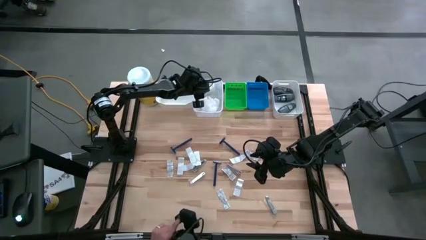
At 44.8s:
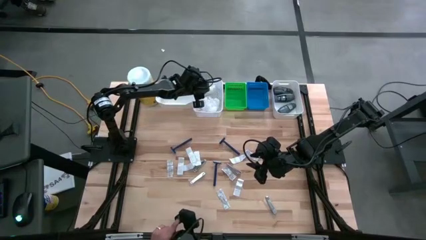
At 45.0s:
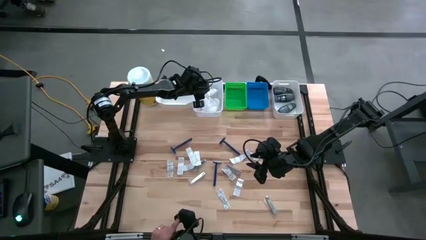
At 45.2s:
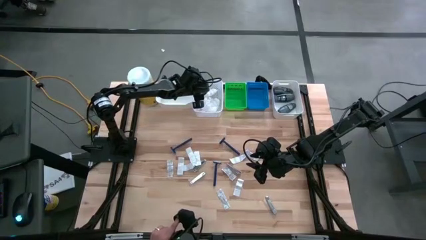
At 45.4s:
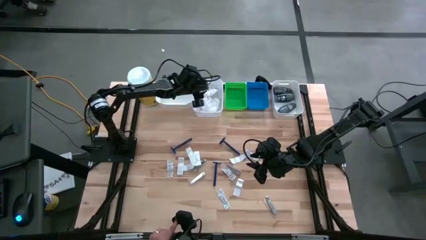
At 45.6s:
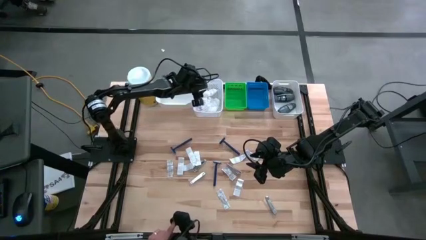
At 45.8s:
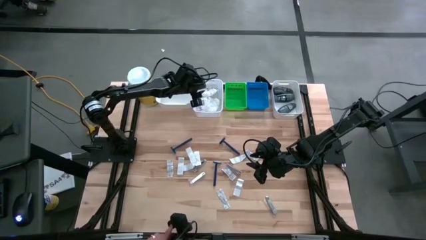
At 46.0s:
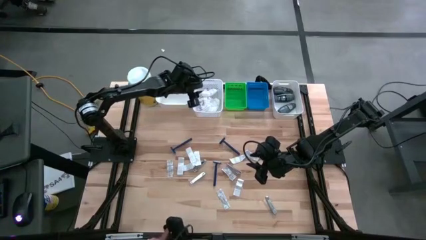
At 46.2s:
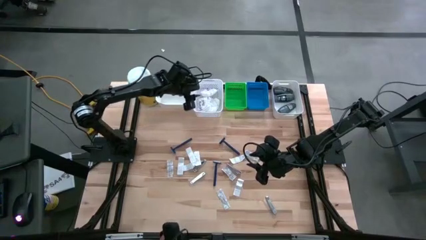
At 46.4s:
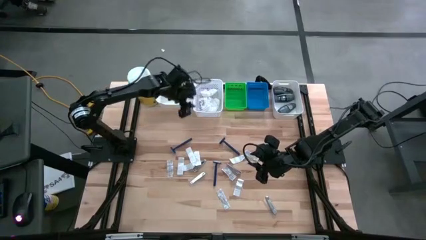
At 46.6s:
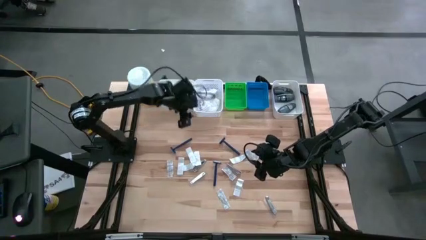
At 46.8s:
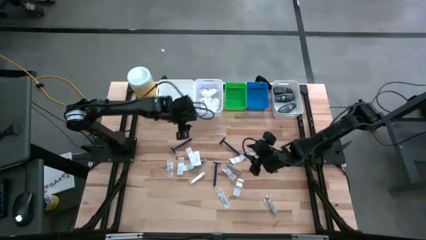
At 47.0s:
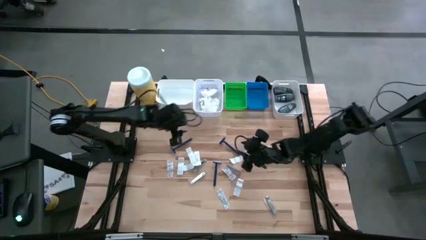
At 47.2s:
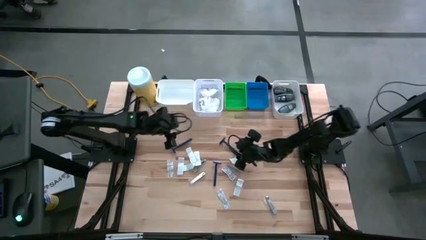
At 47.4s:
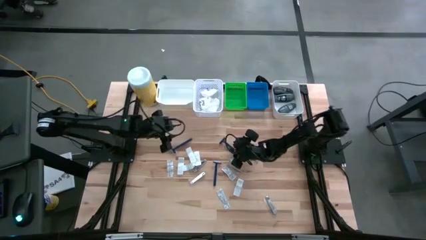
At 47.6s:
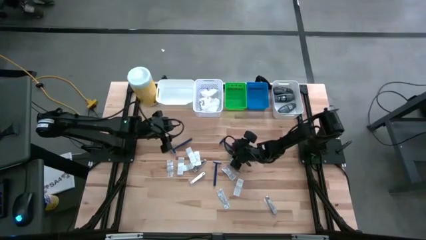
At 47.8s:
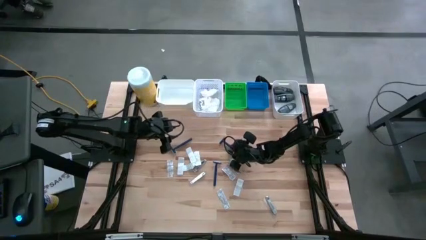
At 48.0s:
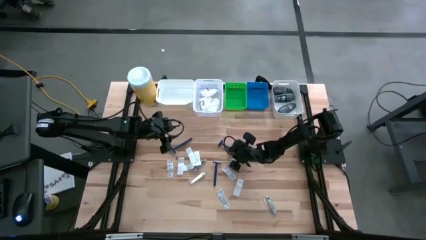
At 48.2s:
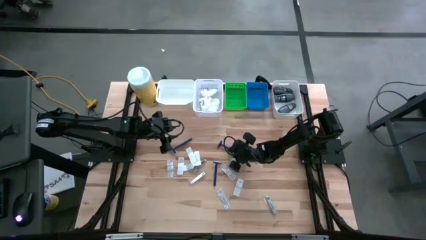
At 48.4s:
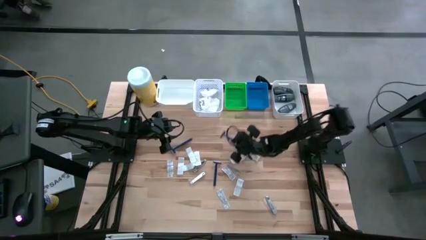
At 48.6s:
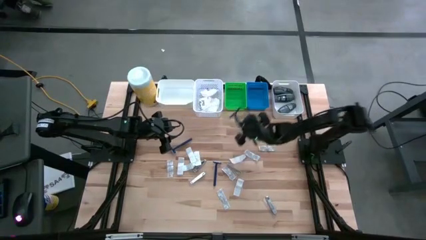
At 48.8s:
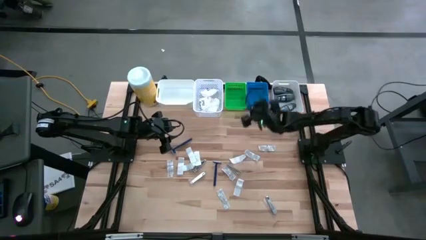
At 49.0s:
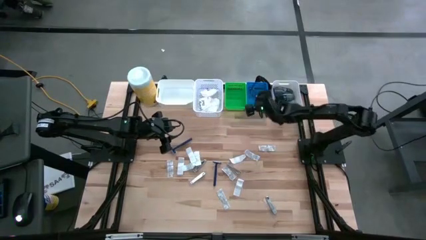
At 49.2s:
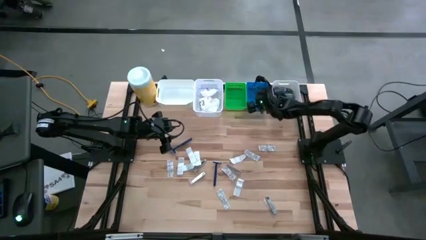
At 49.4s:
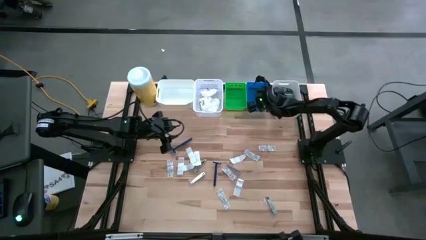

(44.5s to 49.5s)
Task: Pick & Place Travel size toiletries
Put the blue razor into the blue bin

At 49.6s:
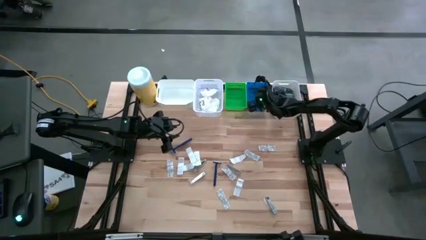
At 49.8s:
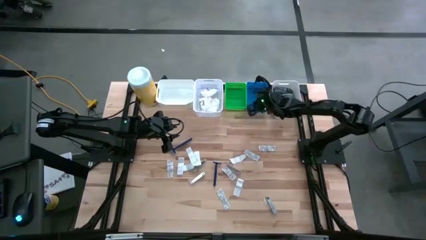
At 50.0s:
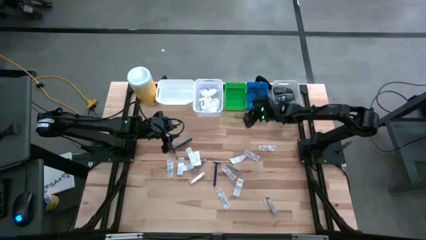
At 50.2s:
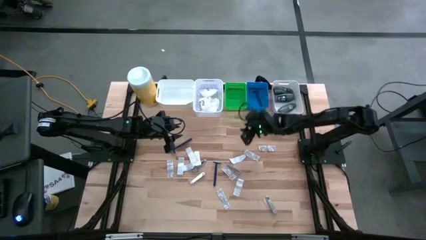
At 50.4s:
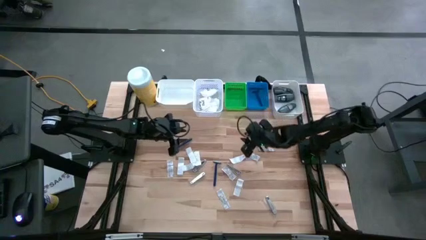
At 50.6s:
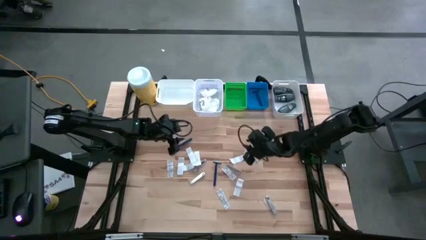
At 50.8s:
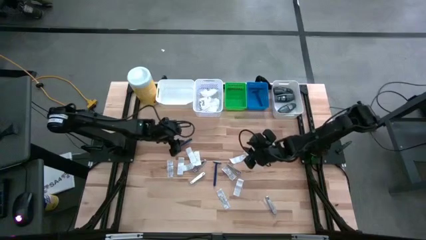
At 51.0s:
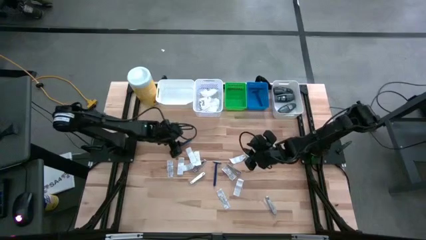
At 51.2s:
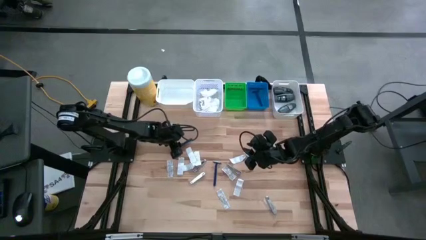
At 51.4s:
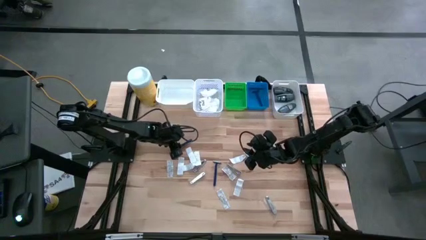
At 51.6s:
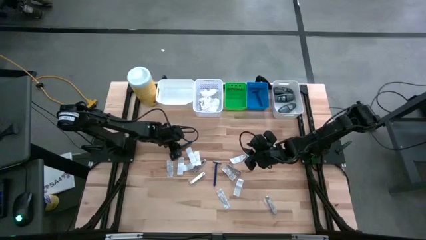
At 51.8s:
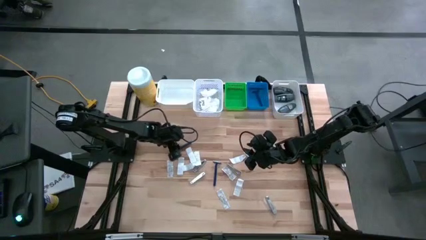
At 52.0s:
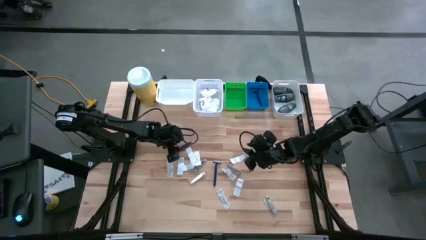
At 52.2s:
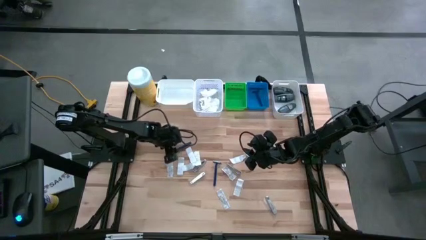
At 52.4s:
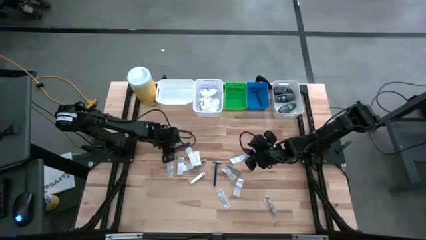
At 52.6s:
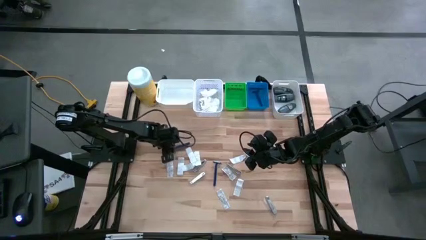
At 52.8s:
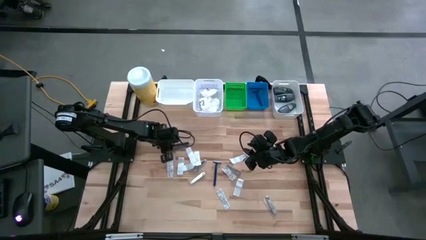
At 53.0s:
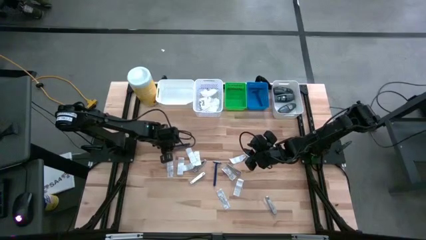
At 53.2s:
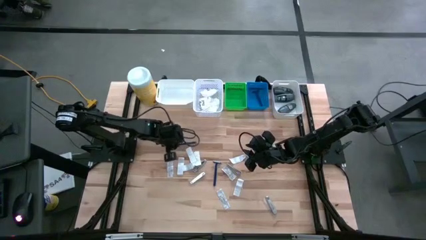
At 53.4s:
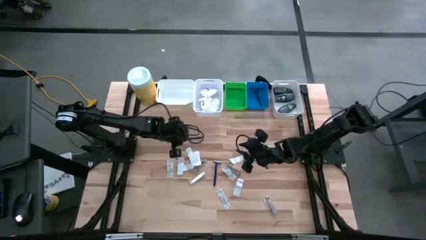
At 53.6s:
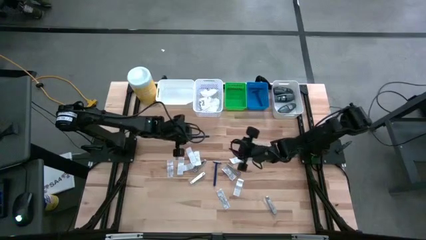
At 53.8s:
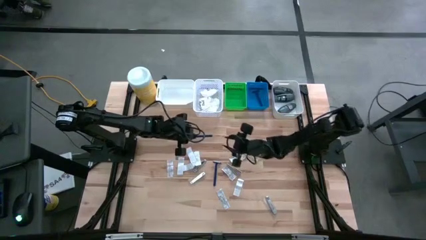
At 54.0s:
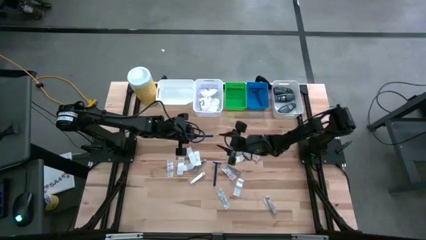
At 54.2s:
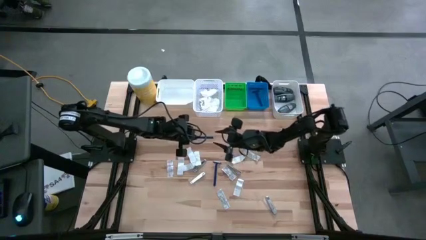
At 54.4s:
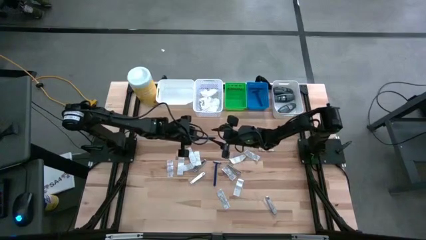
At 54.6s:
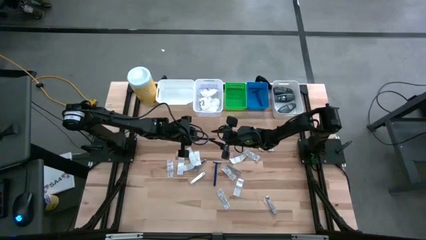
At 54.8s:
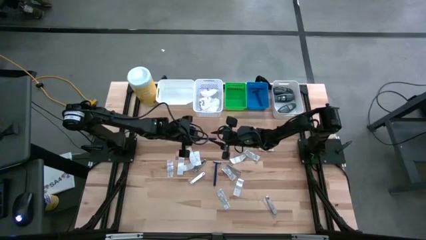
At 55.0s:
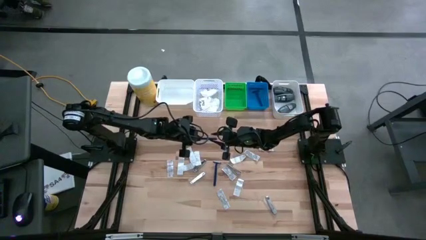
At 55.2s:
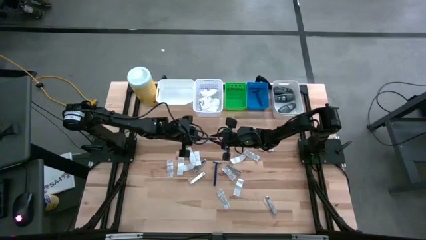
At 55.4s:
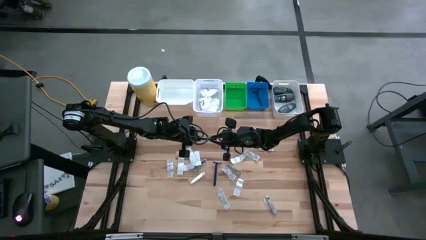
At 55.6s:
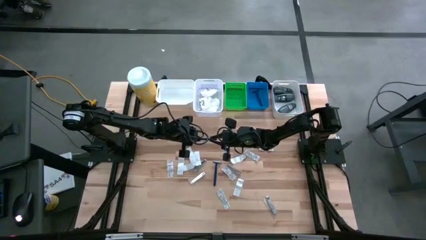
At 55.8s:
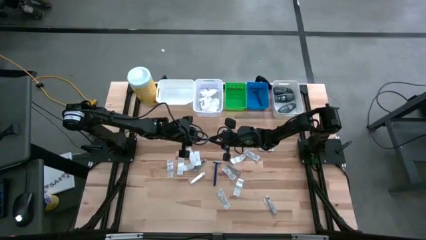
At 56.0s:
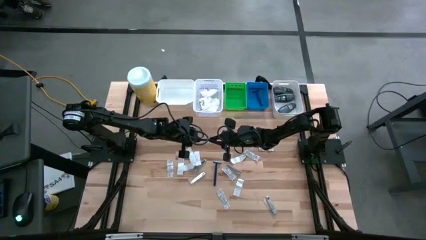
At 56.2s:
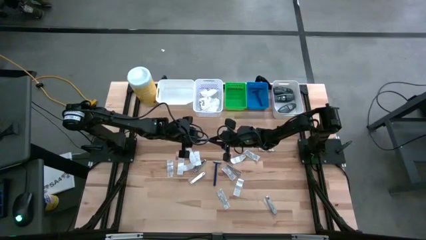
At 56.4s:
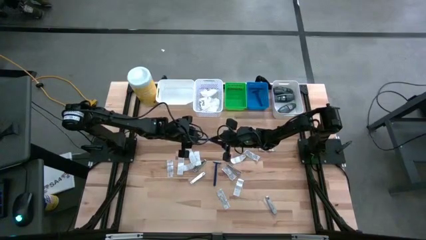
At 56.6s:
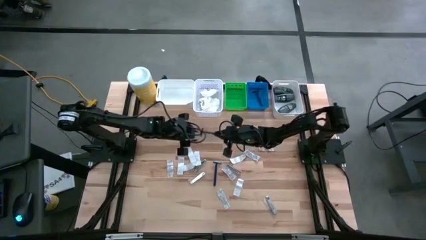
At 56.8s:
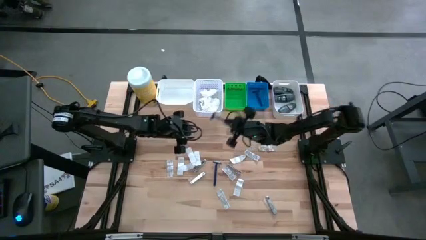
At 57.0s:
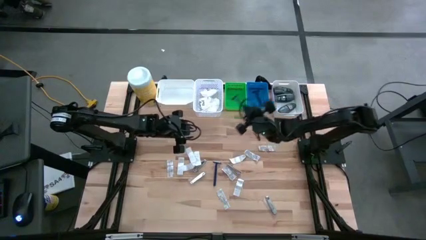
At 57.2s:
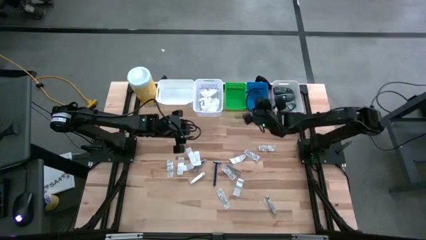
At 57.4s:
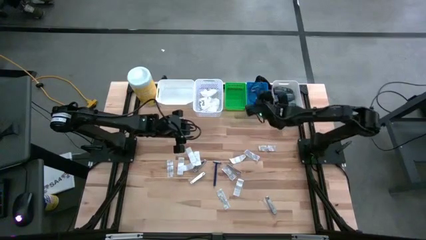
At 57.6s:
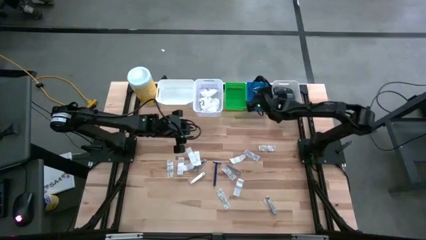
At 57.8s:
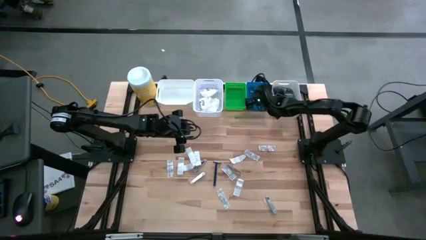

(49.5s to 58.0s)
Put the blue razor into the blue bin

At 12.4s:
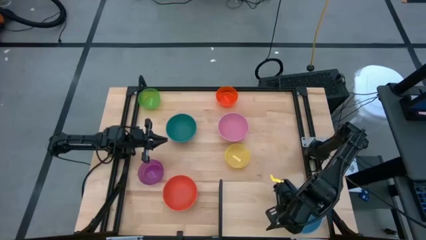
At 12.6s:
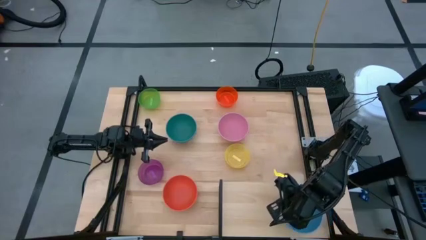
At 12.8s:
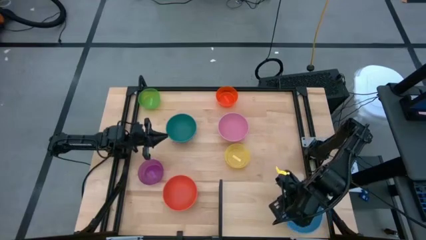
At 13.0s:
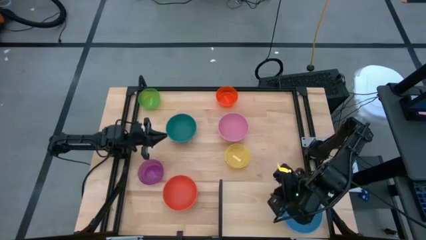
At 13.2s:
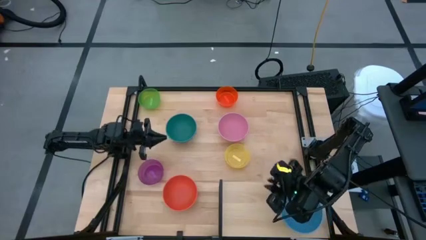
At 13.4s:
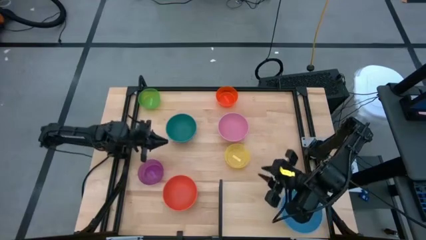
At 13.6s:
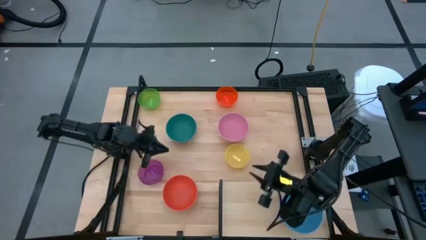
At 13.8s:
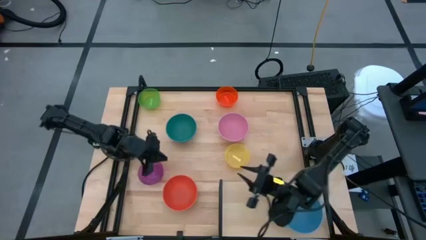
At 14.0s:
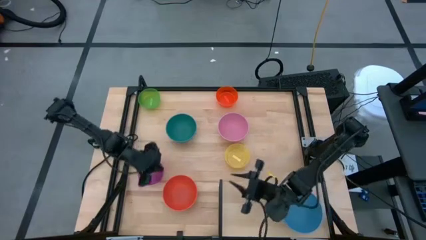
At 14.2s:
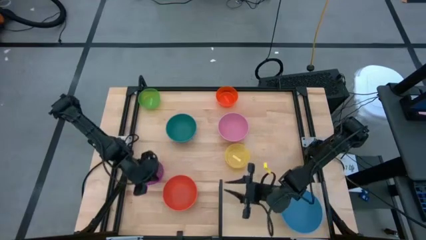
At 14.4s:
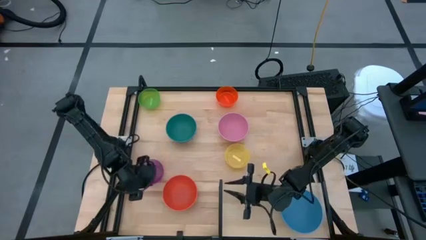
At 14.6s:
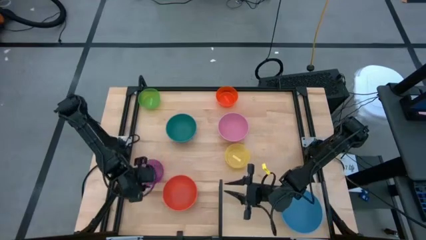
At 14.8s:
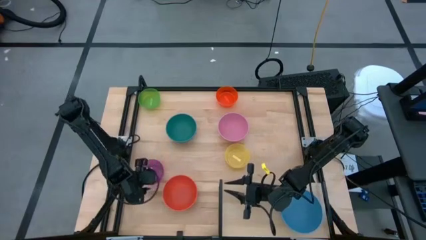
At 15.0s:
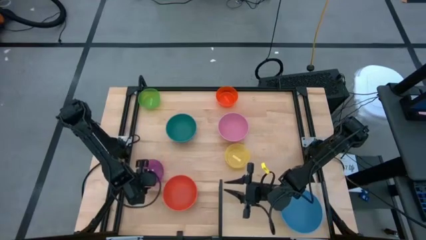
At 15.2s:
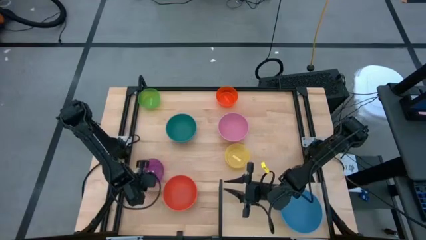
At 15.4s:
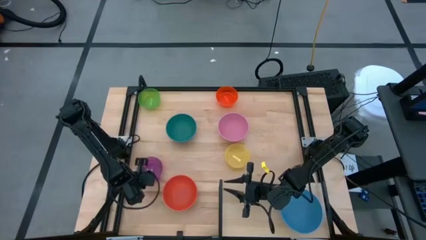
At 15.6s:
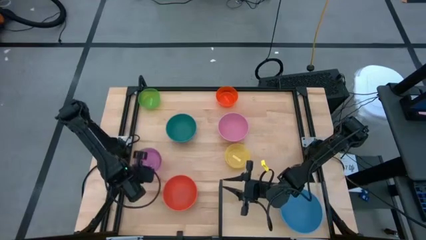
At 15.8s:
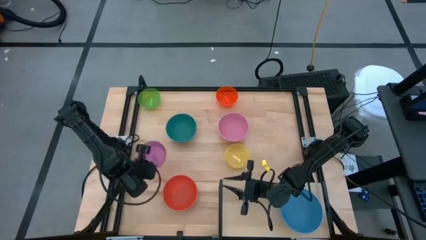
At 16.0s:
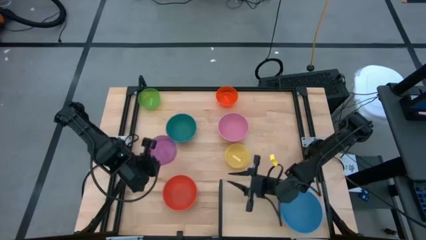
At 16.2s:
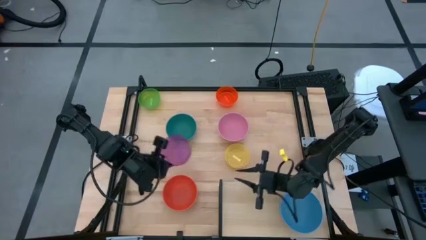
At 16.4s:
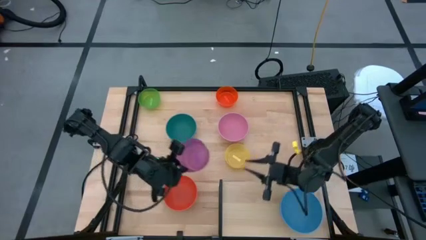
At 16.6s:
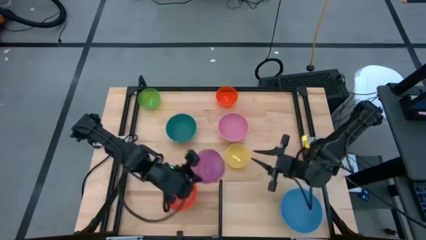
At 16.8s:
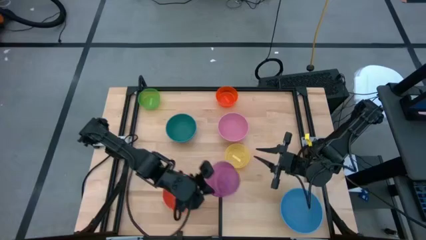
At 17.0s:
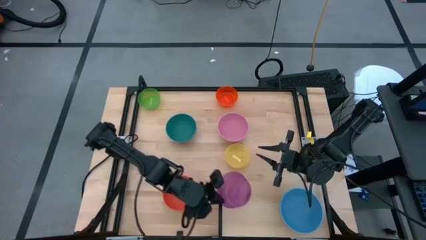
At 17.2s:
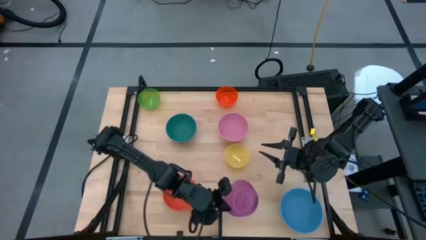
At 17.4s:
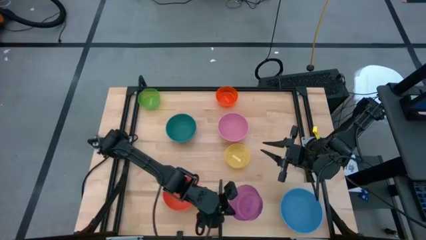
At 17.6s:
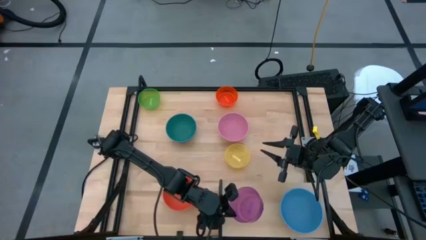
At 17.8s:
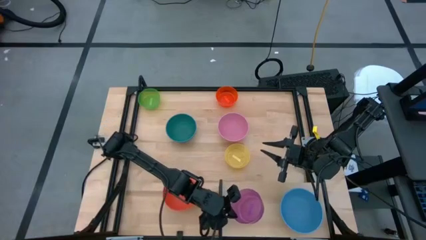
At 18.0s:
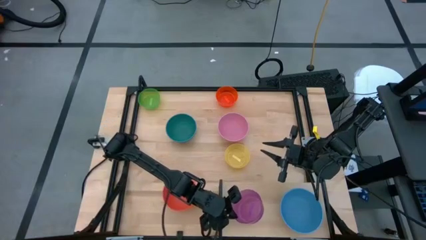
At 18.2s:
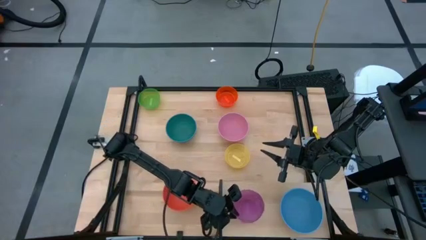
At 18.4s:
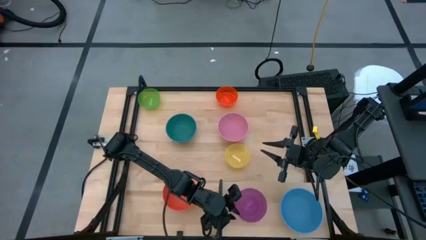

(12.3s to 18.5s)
Task: Place and stack bowls onto a shelf
Put the purple bowl on the shelf
